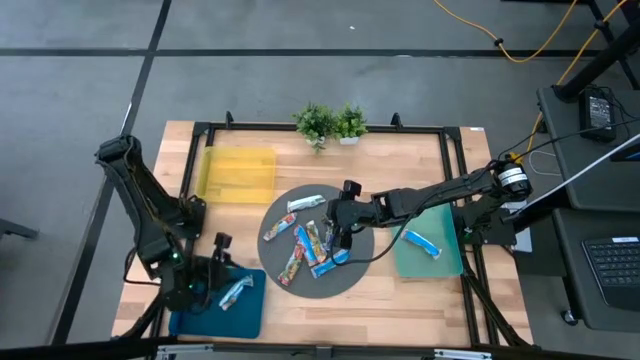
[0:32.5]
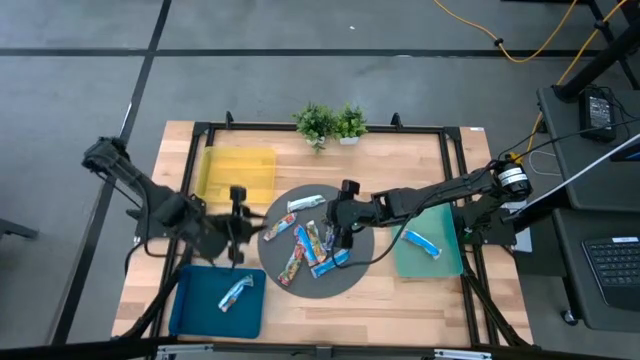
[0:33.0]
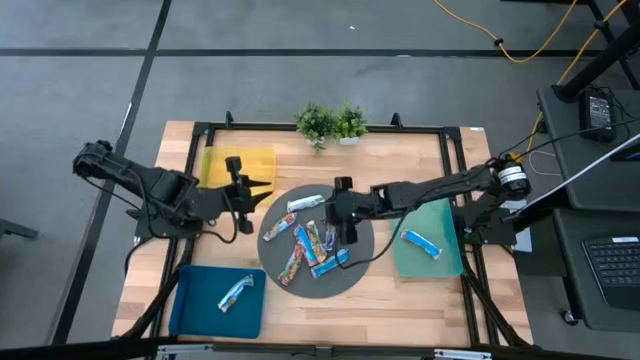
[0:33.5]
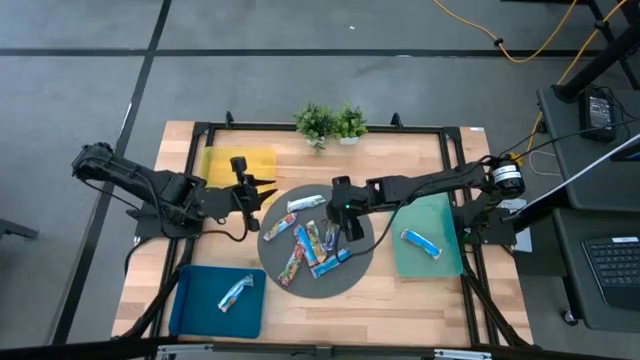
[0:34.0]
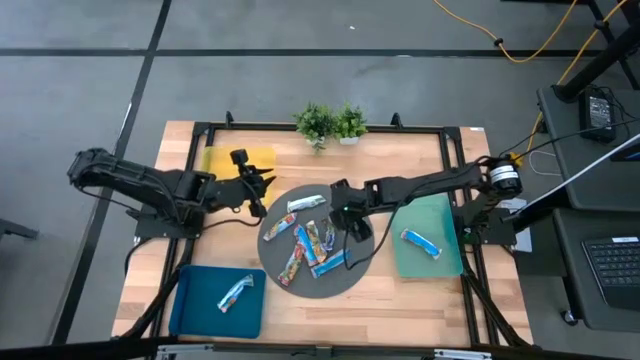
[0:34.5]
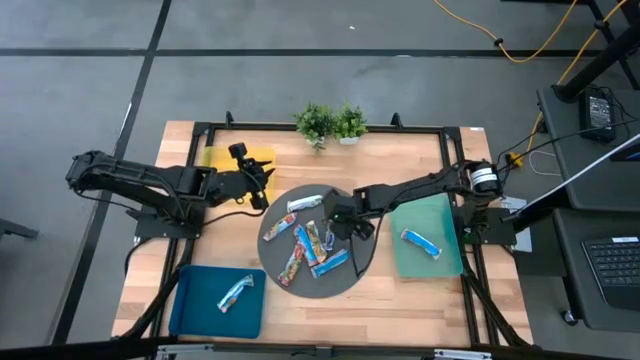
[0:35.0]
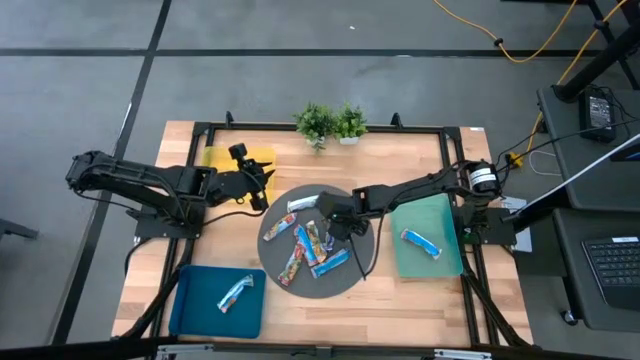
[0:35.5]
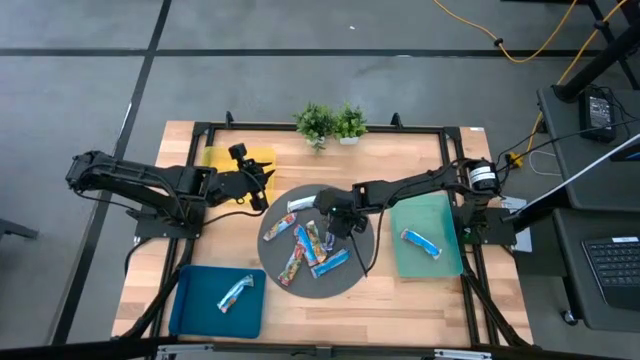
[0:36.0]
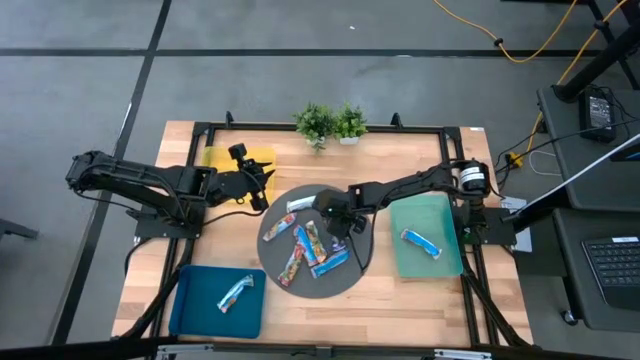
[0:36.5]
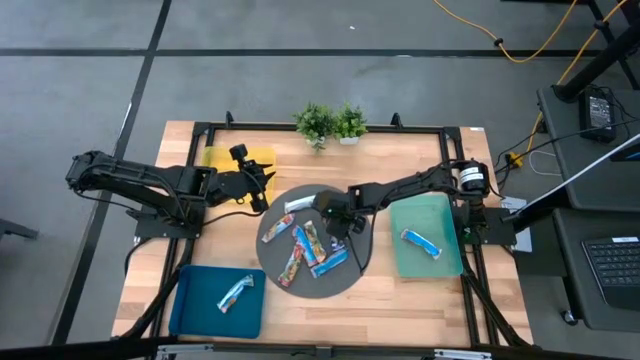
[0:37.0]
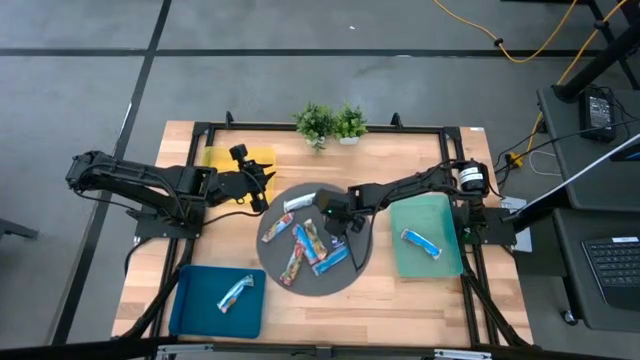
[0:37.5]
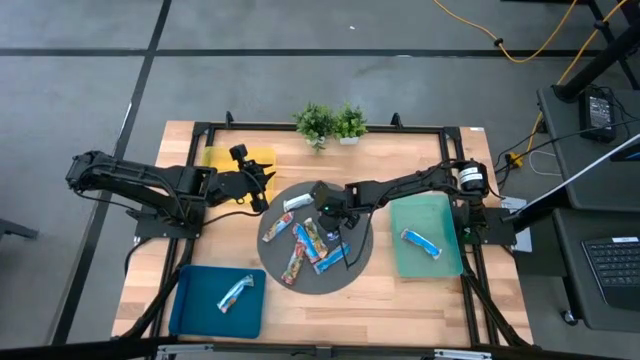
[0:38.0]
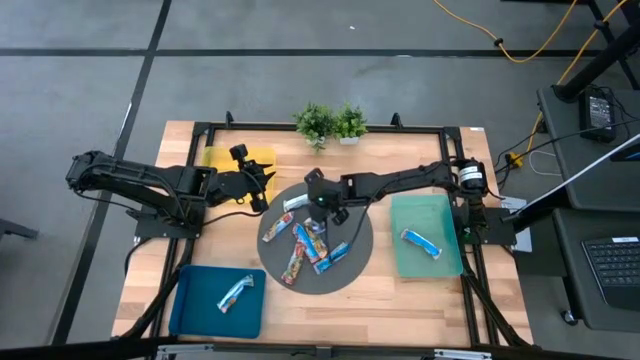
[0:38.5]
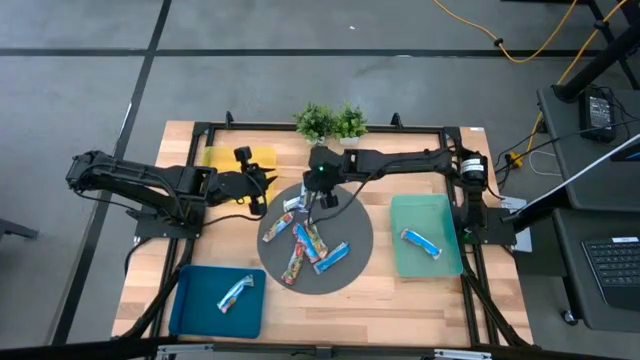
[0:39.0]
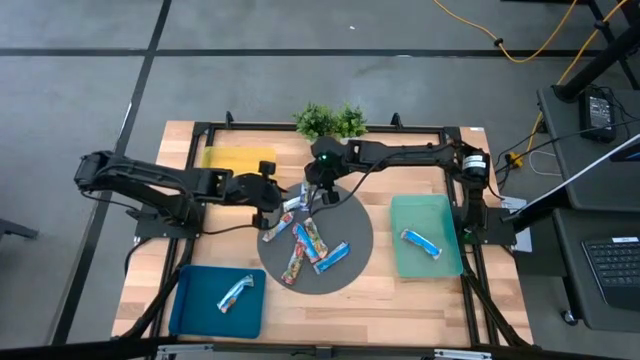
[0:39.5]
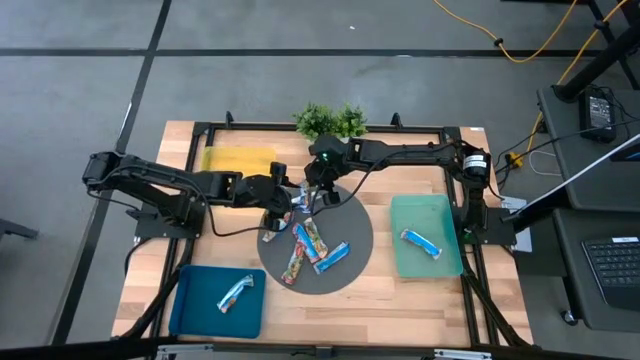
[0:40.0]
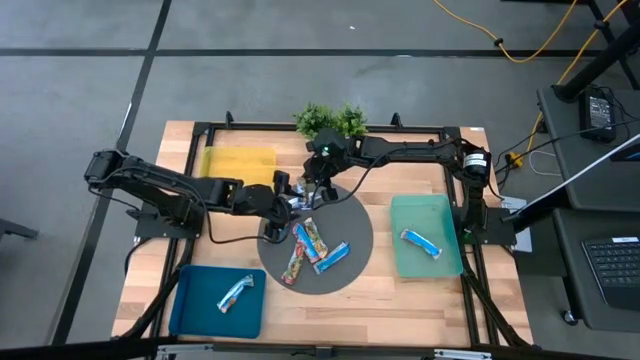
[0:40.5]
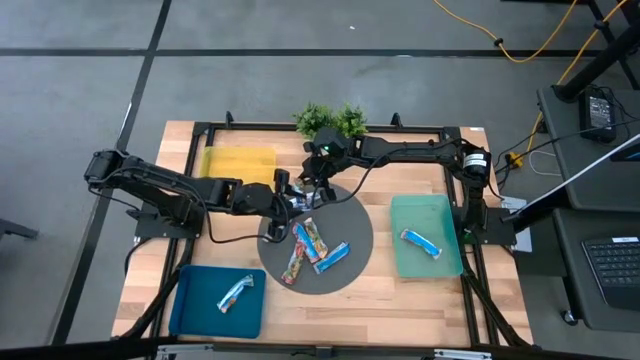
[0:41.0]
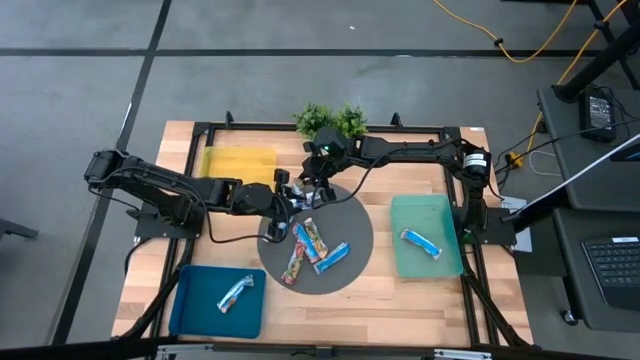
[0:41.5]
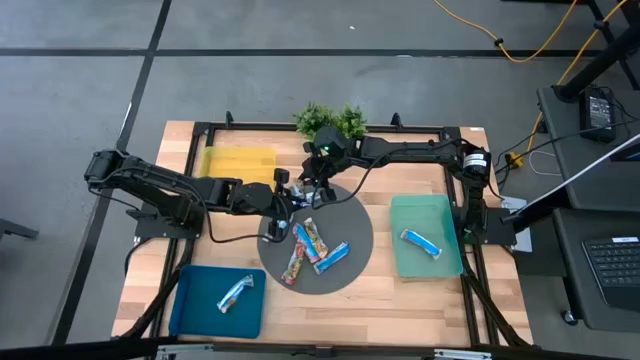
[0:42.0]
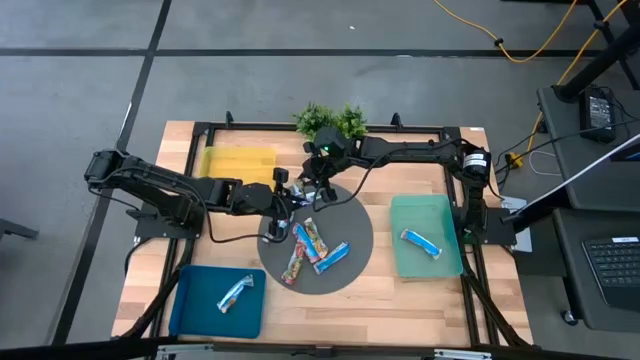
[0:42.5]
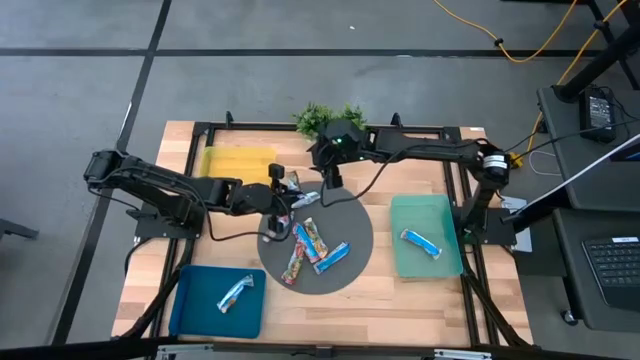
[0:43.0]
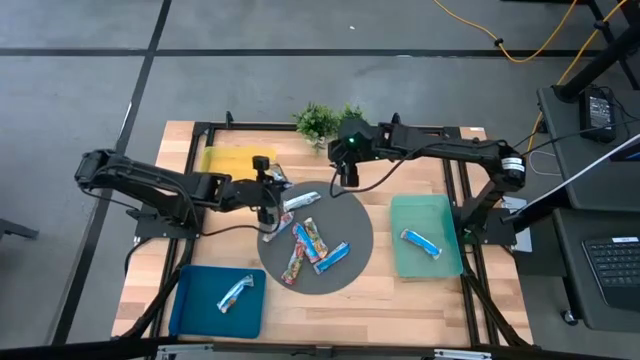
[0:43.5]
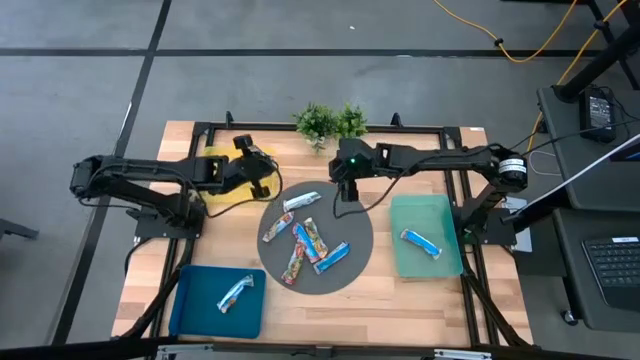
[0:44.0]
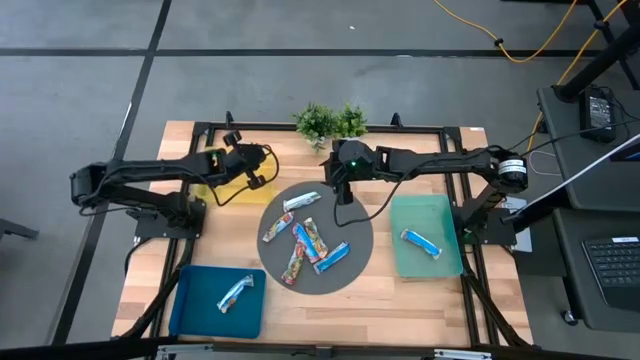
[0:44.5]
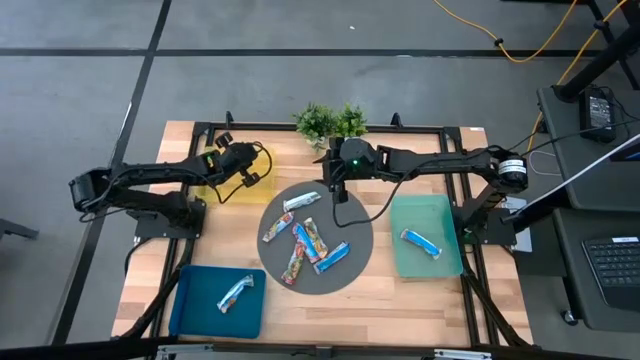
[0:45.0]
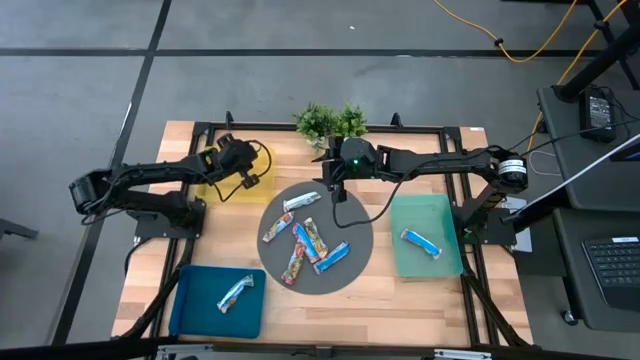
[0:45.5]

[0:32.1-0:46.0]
Task: Pick and place Granola Bars by type
Put the blue granola bar into the yellow bin

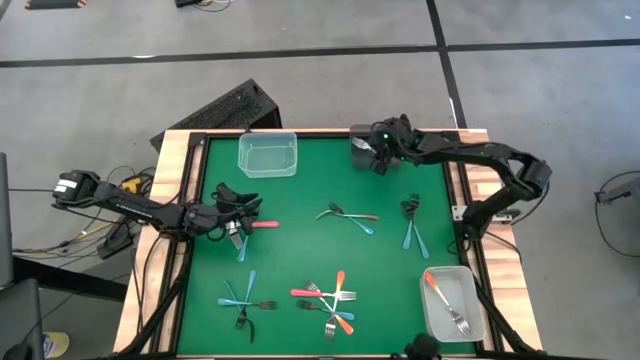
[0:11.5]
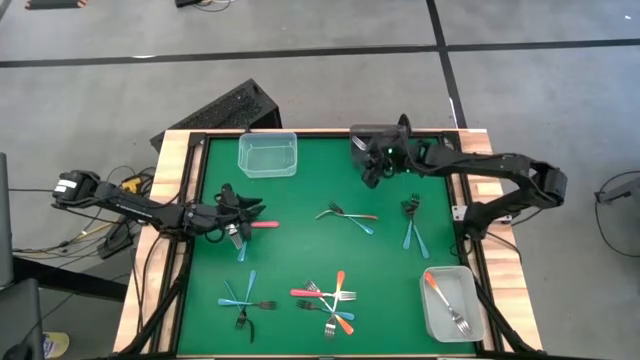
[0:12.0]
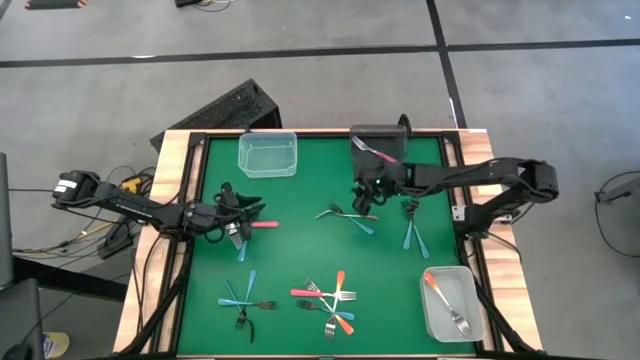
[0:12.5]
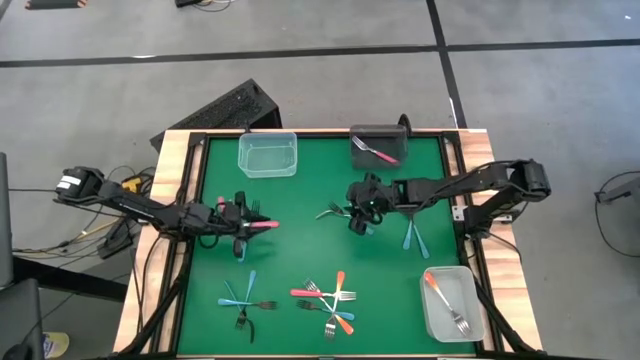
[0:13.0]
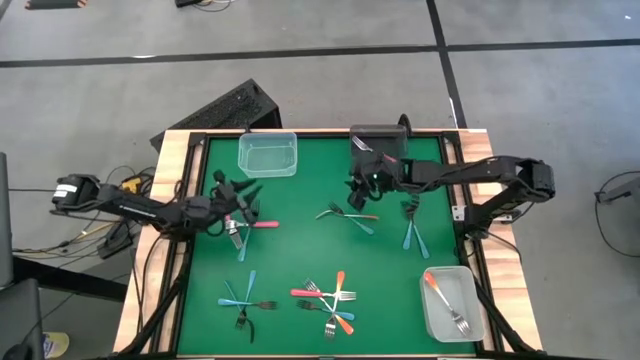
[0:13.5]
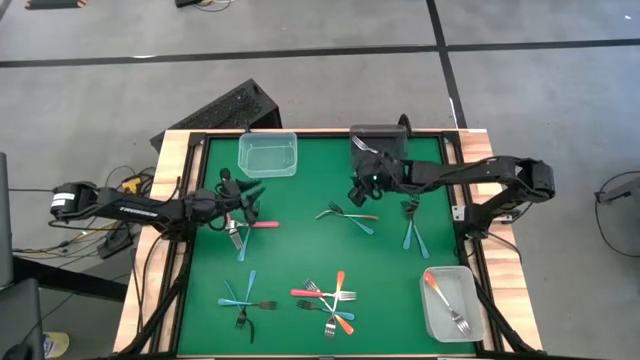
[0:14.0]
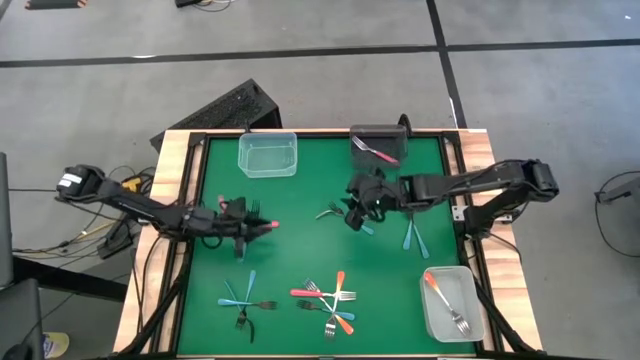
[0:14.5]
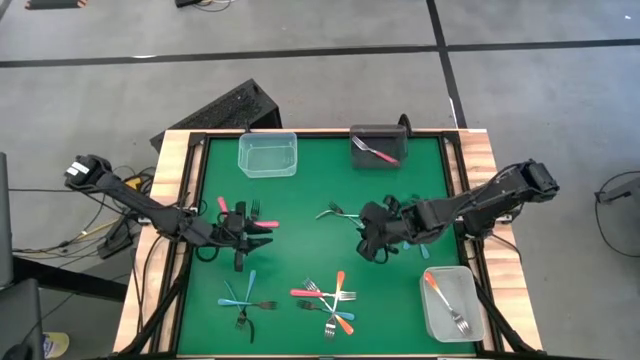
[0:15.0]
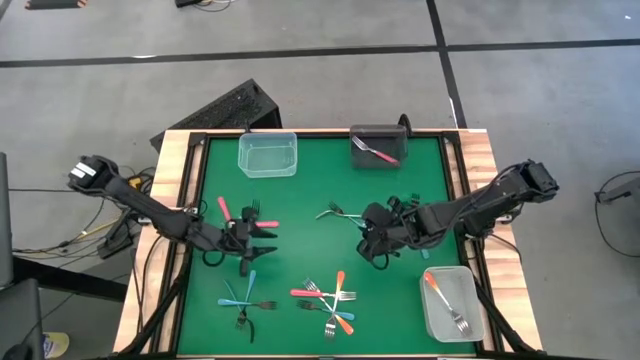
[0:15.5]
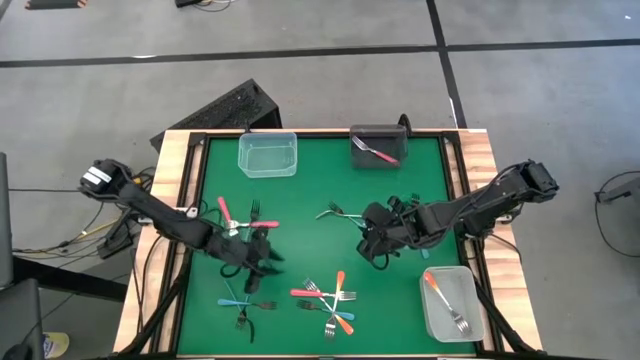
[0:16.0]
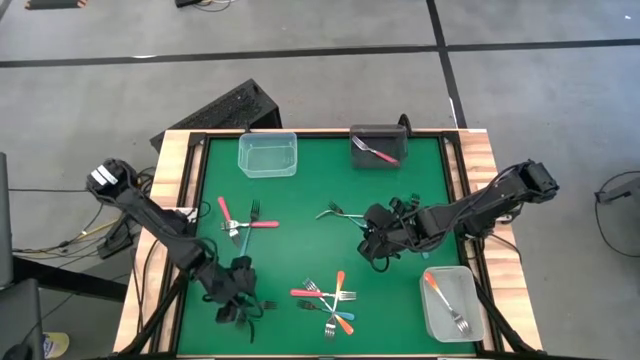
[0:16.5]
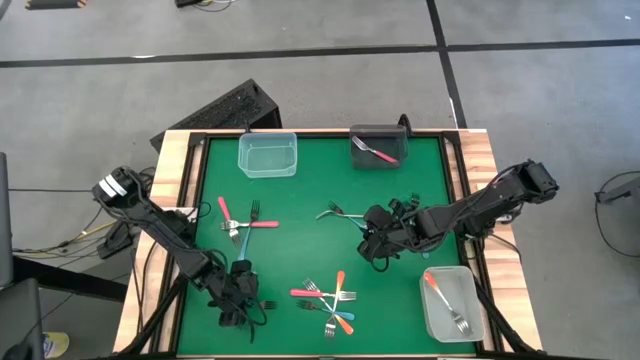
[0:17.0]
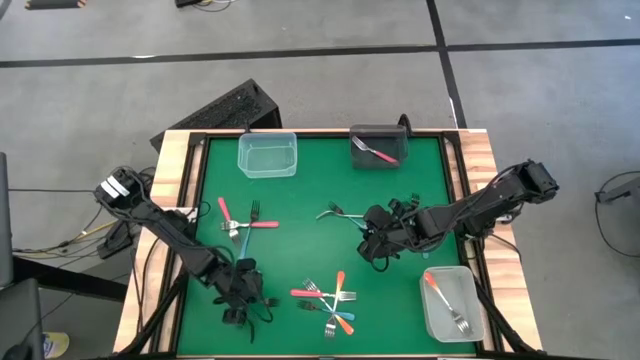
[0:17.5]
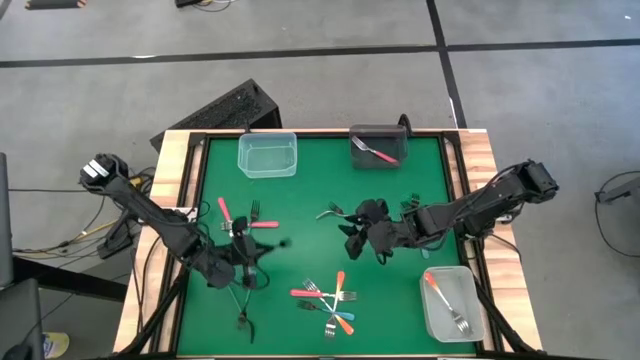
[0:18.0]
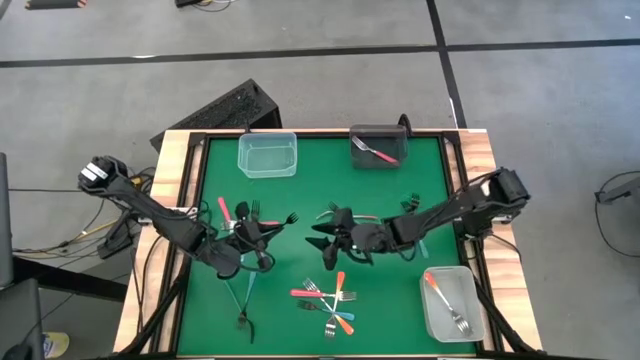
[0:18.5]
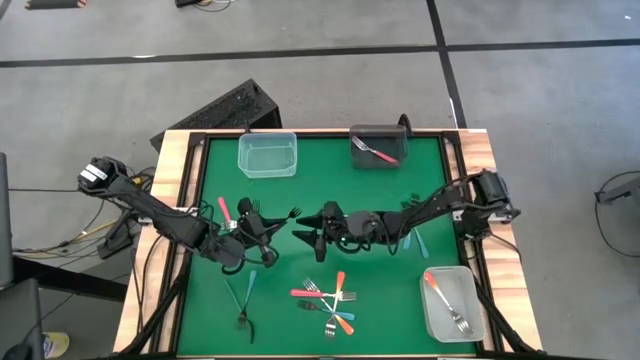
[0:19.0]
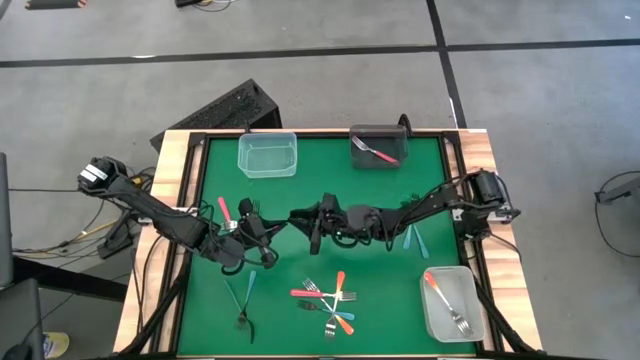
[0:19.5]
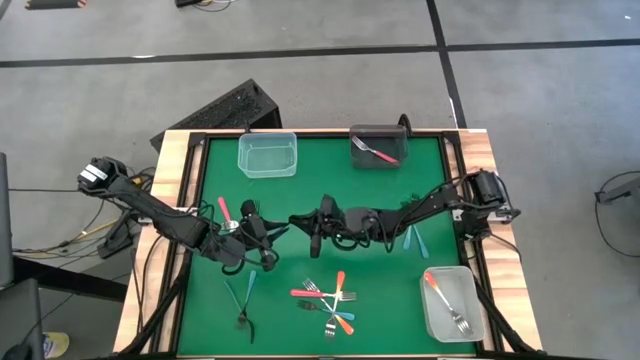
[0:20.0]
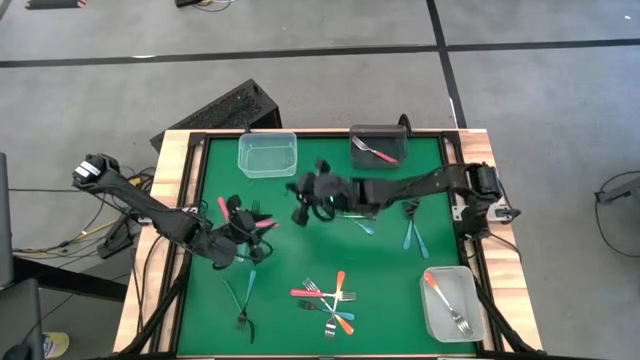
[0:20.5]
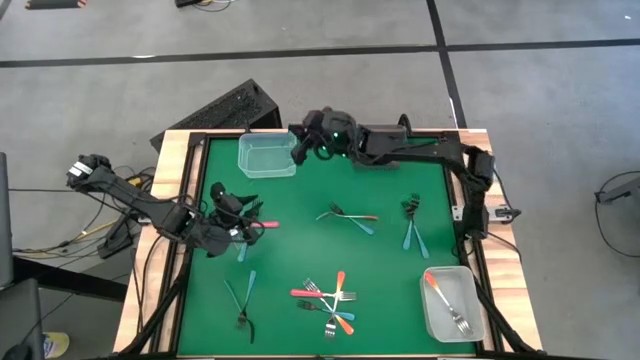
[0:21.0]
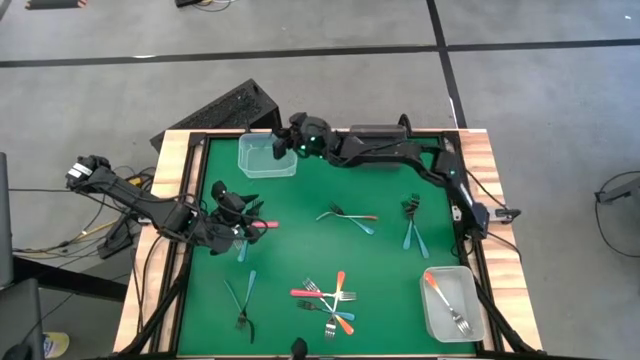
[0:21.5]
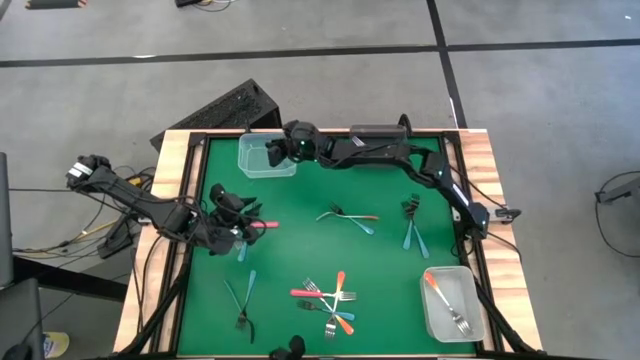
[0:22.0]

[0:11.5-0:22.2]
Task: Sort silverware by color (type)
Put the black fork into the transparent bin
